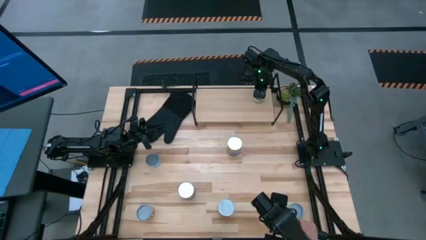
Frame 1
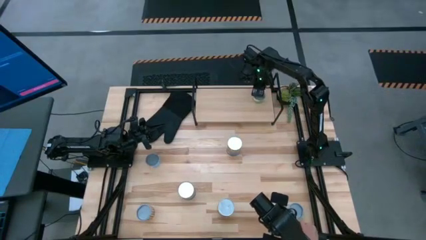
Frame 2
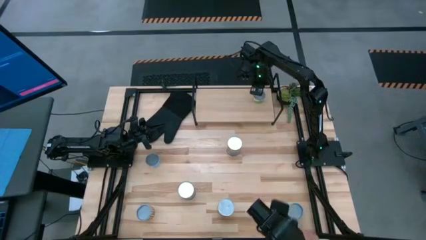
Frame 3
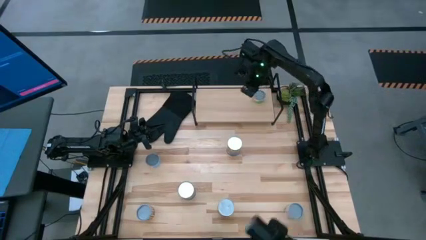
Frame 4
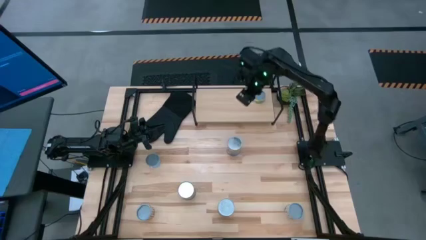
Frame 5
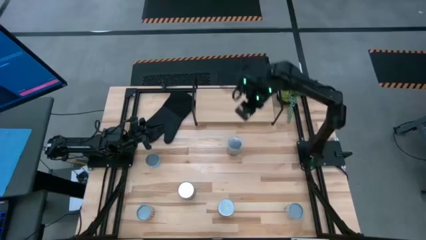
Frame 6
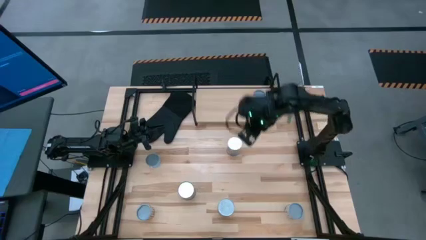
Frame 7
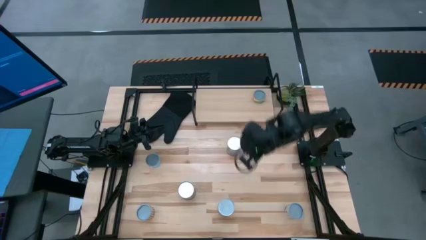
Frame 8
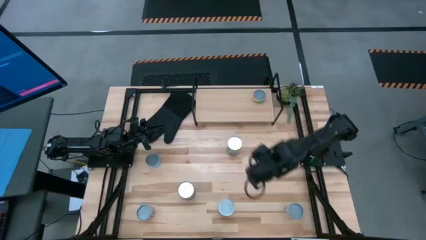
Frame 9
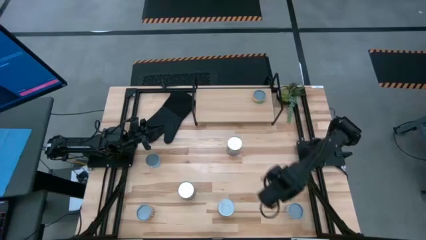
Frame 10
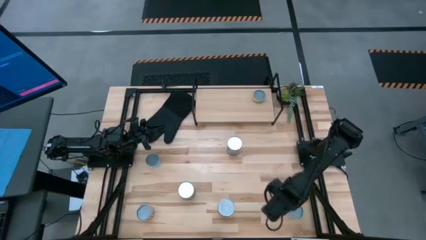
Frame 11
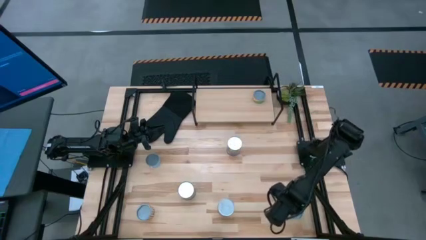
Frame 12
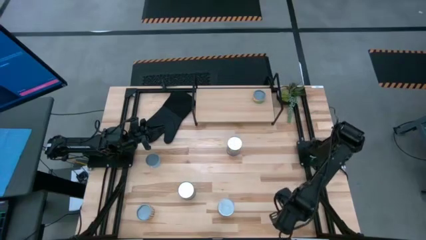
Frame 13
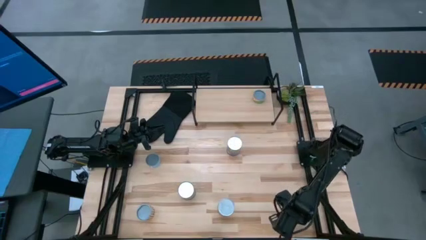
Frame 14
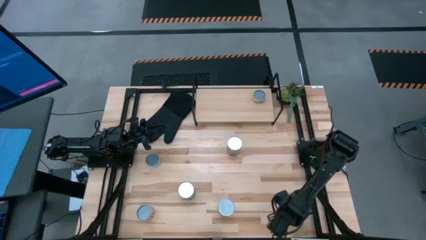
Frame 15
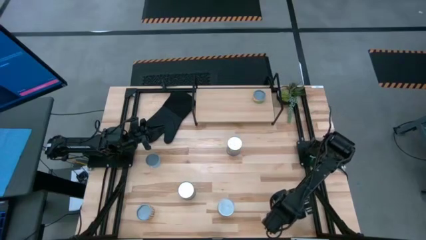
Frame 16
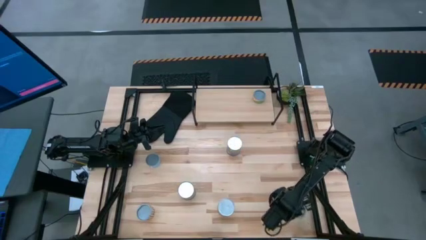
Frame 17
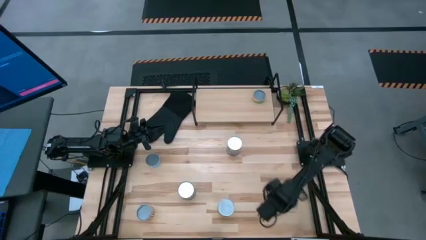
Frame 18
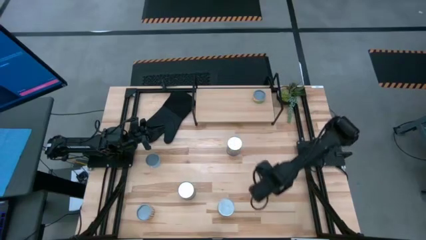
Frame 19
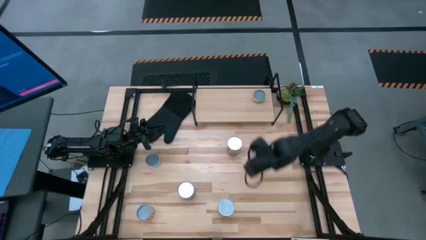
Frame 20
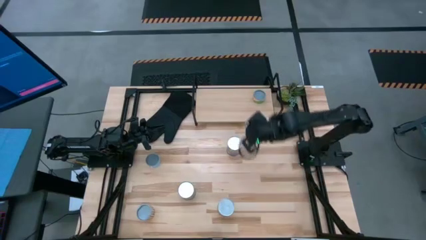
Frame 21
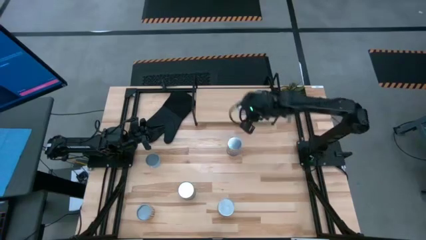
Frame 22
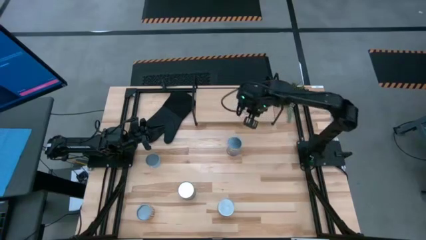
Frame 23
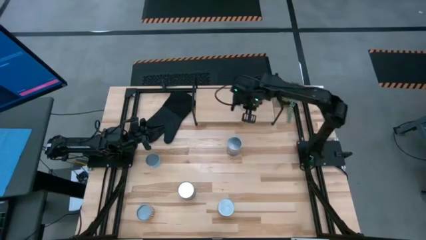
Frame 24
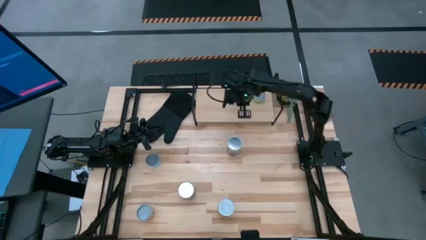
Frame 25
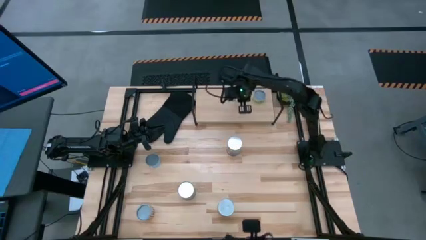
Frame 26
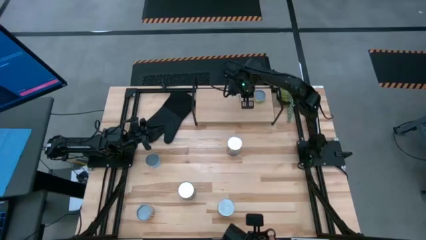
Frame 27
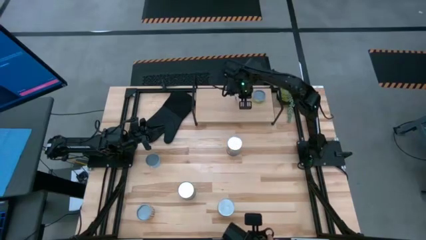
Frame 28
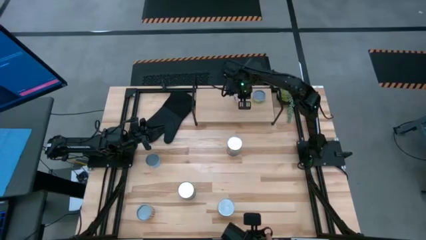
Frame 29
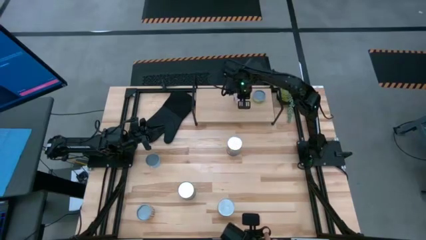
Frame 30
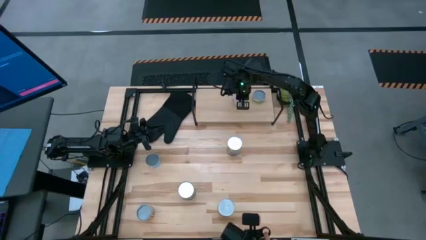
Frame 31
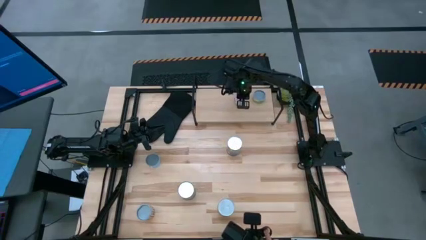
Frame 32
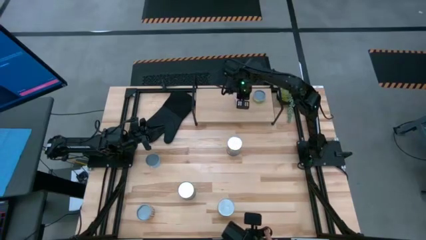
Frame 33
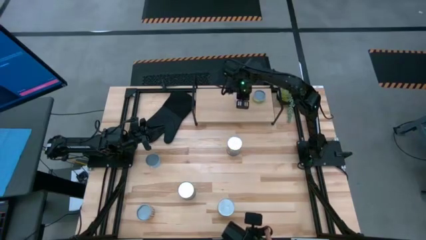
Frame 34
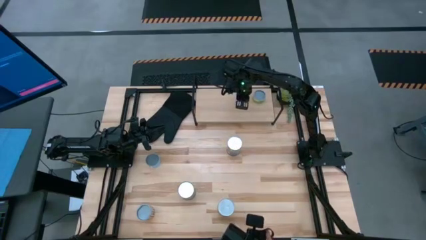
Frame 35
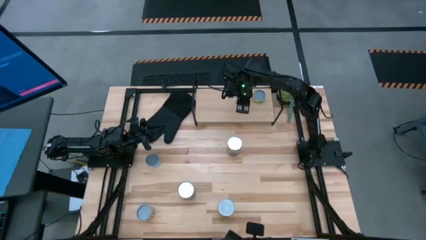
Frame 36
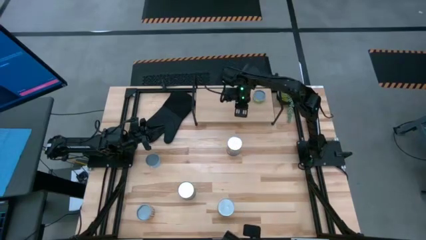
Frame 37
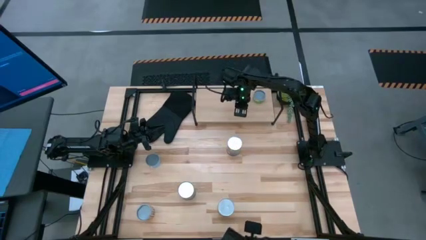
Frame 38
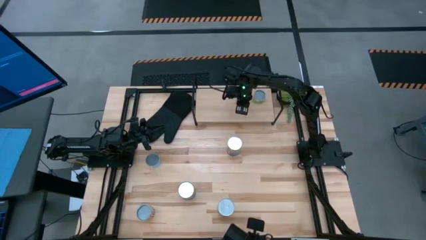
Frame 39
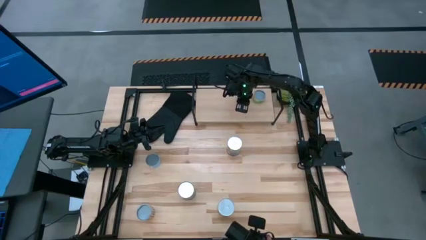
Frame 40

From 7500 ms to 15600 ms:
Task: Pick and place cans onto a shelf
Put the small canned peas on the shelf

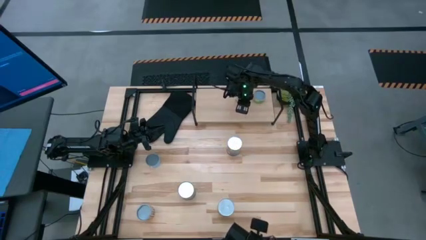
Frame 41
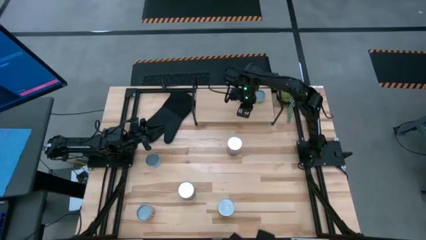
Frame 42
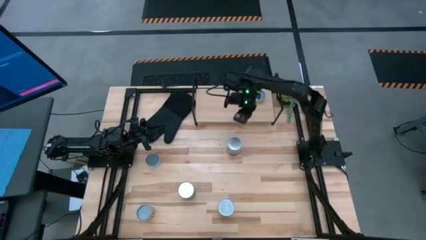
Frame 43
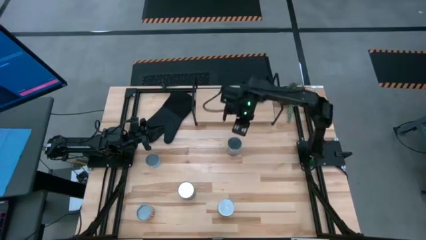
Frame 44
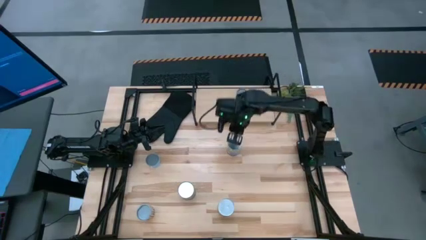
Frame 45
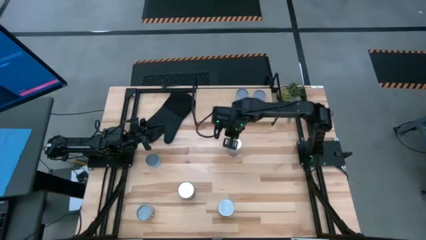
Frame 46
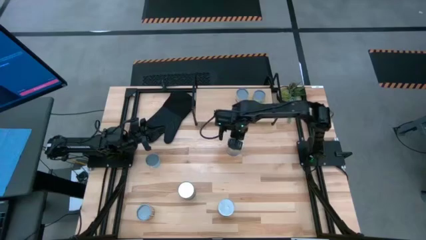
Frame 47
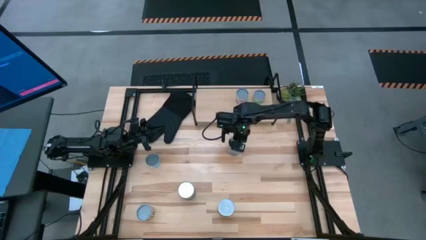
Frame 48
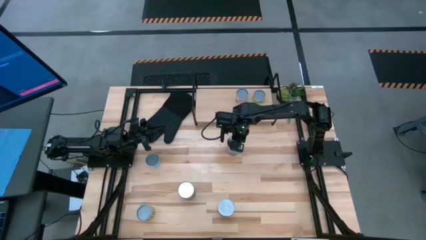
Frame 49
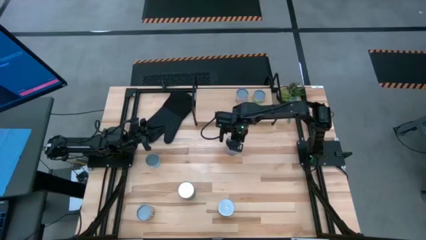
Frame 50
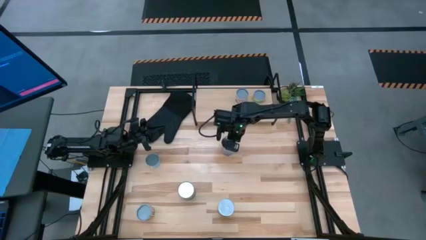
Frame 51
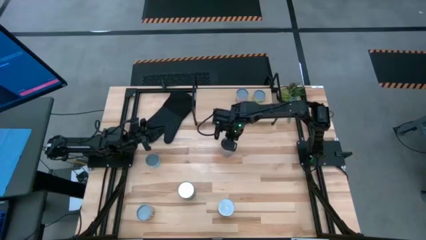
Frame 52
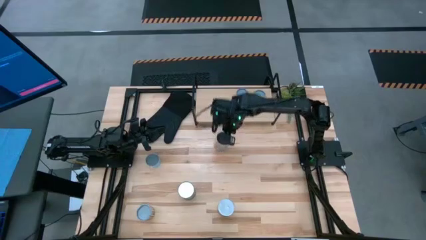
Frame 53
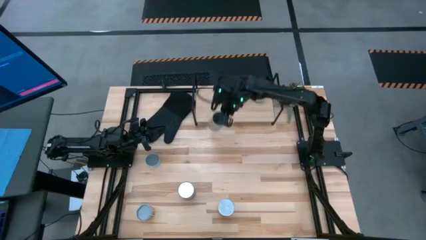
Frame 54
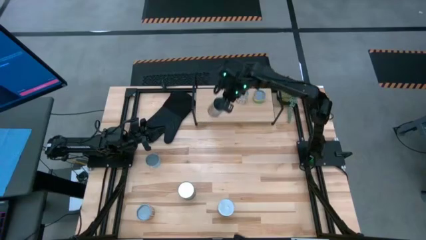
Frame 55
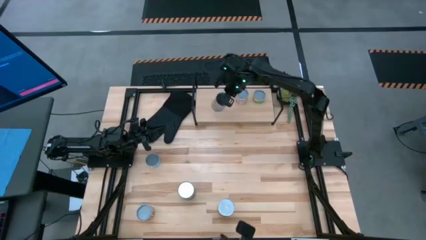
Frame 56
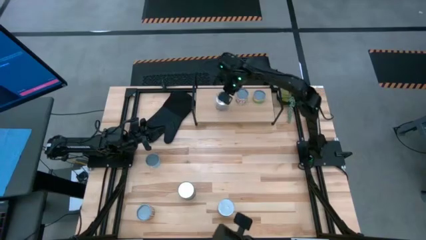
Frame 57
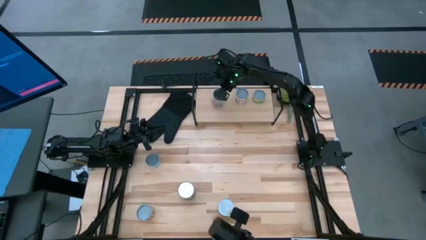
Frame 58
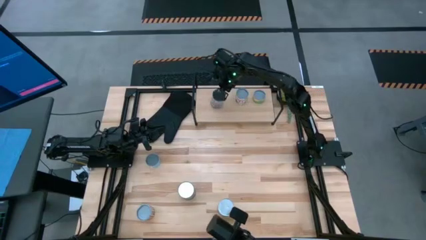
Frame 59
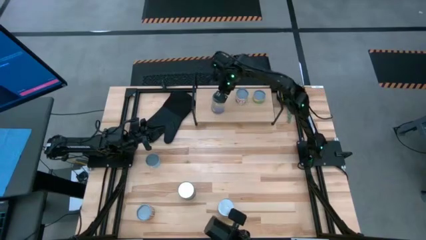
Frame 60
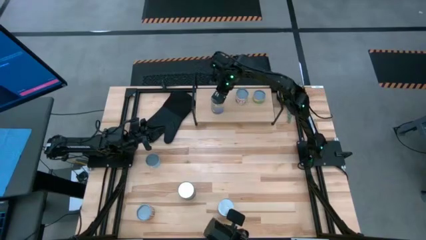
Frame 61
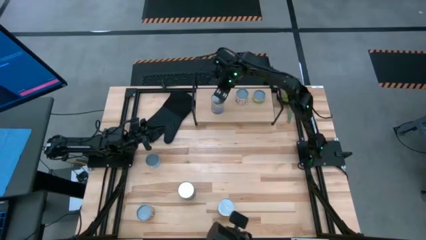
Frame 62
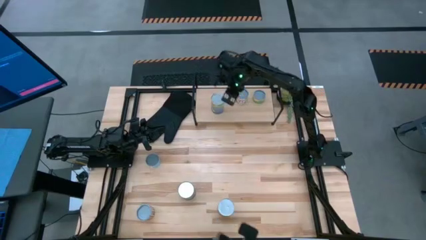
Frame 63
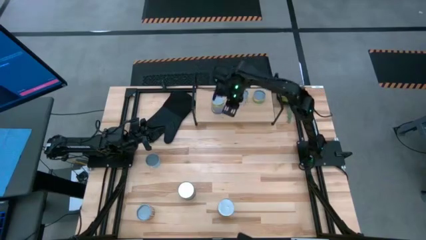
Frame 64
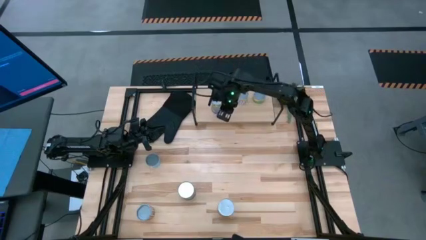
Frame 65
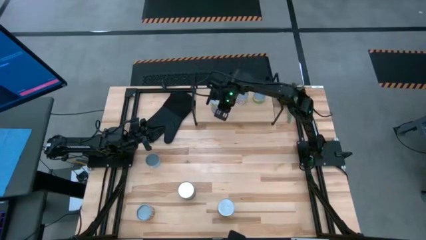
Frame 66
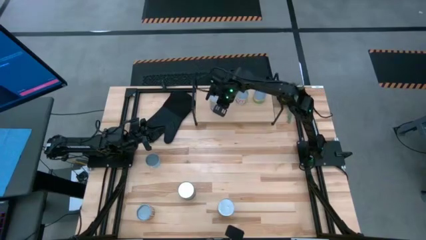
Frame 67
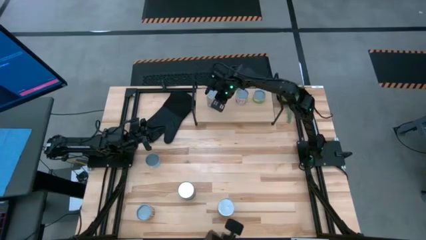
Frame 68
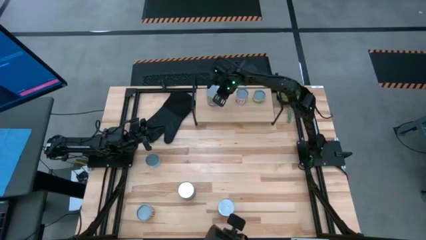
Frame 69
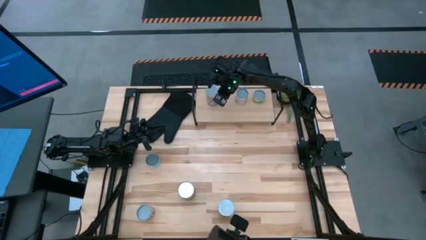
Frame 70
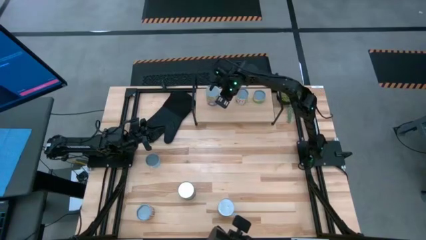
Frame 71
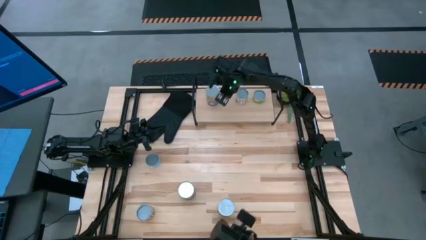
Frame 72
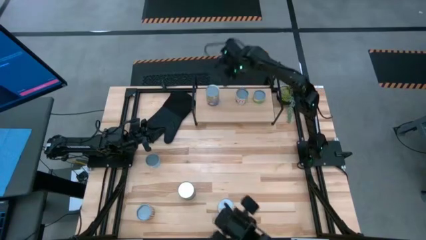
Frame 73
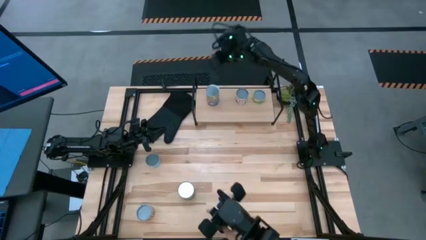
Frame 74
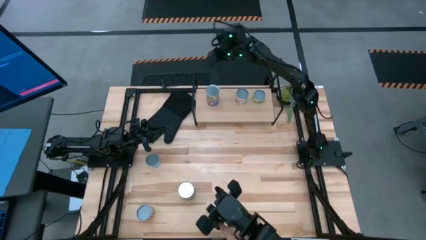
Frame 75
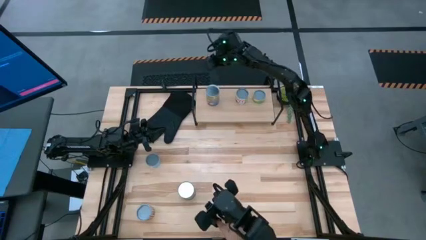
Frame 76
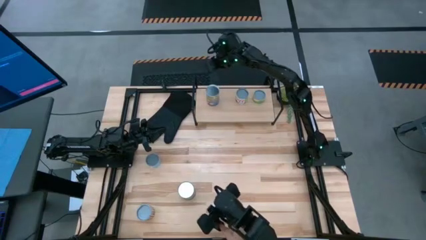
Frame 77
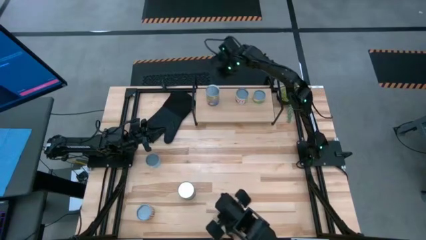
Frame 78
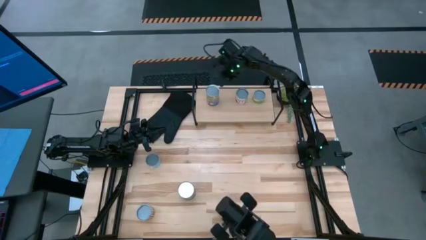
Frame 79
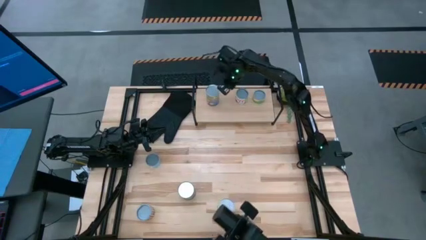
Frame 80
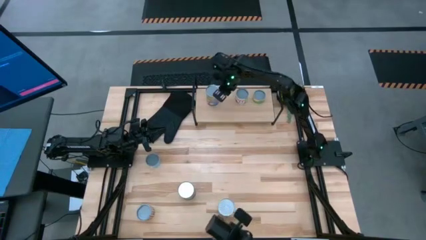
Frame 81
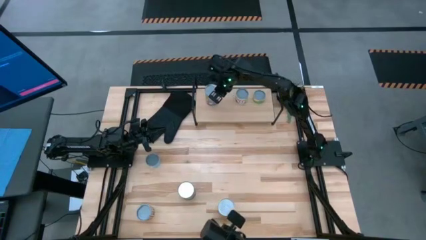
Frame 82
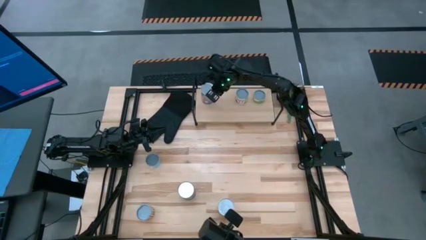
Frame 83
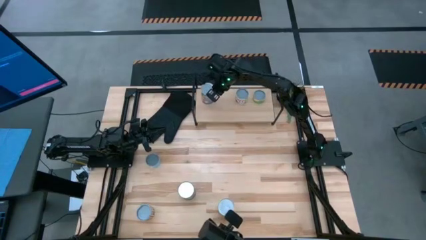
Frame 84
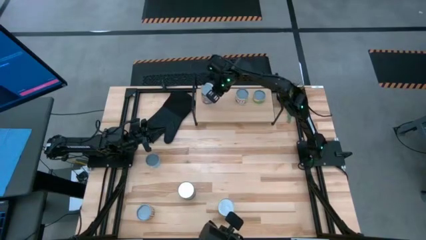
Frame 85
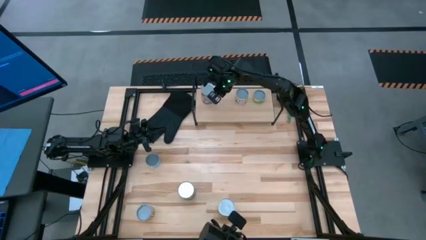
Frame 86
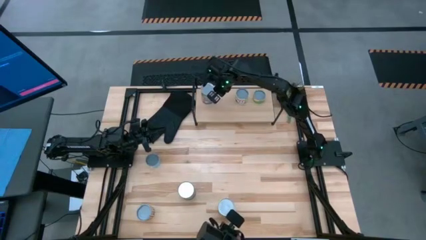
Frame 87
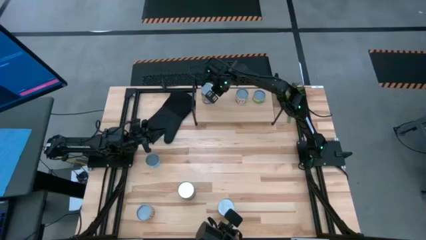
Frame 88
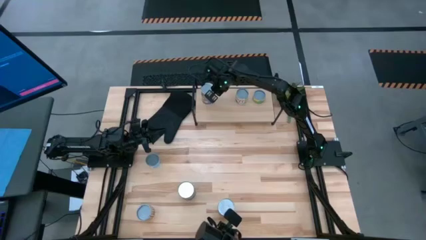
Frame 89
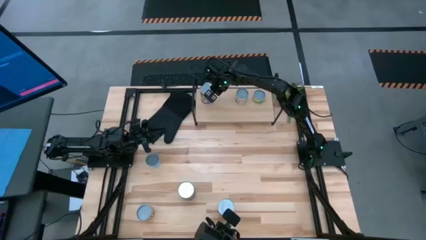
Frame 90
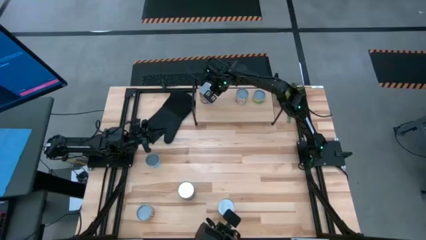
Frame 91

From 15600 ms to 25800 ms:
Put the canned peaches on the shelf
